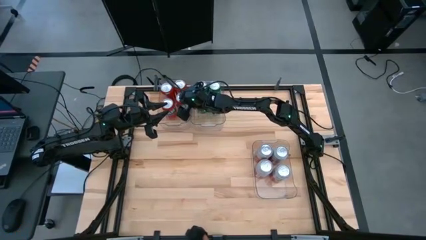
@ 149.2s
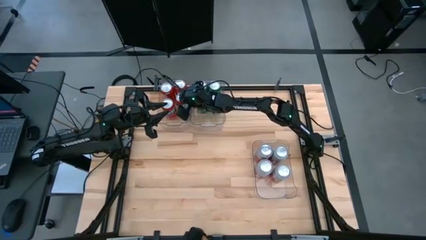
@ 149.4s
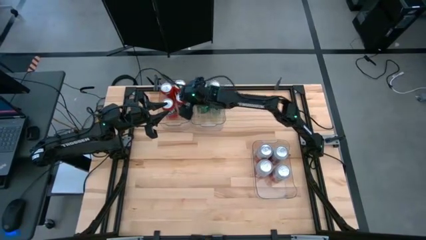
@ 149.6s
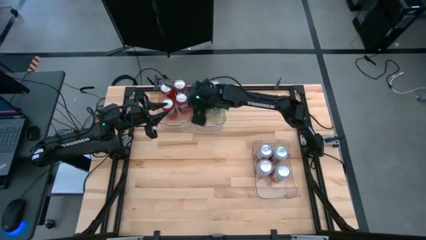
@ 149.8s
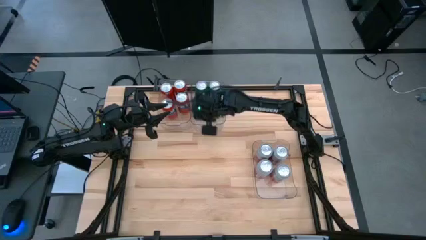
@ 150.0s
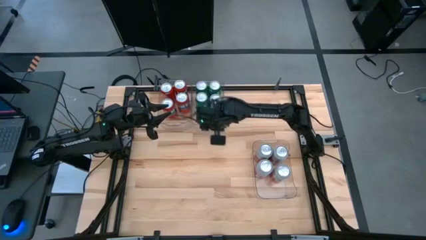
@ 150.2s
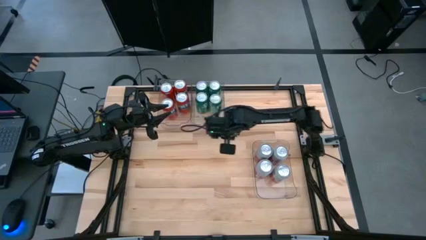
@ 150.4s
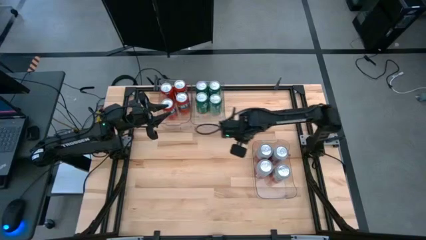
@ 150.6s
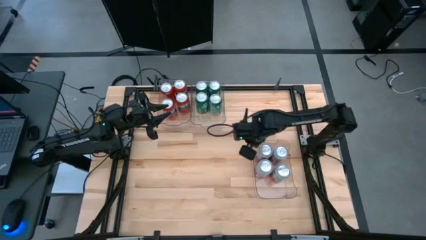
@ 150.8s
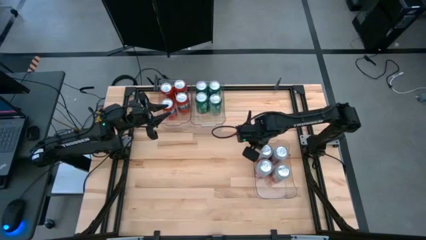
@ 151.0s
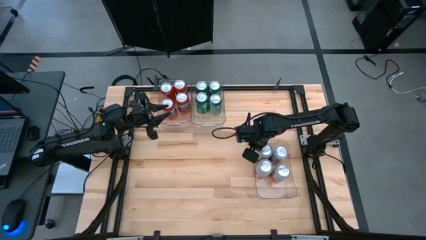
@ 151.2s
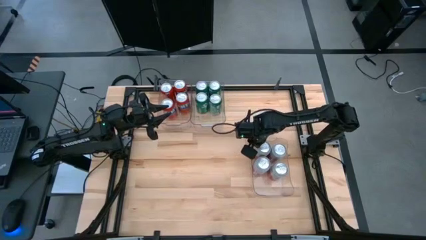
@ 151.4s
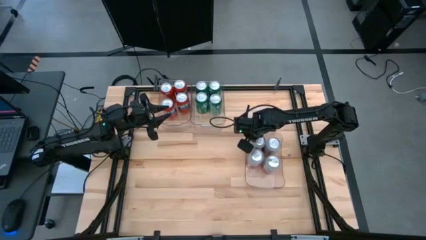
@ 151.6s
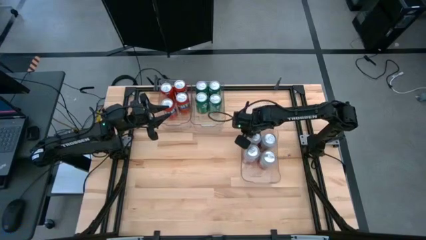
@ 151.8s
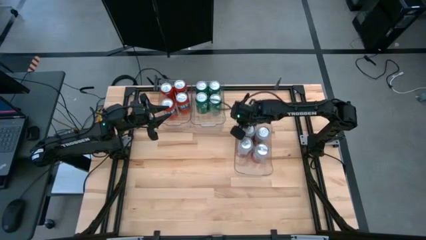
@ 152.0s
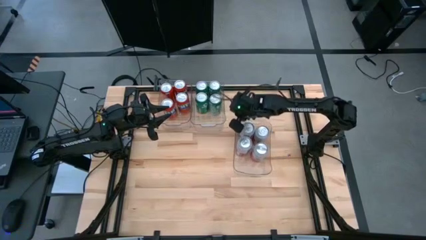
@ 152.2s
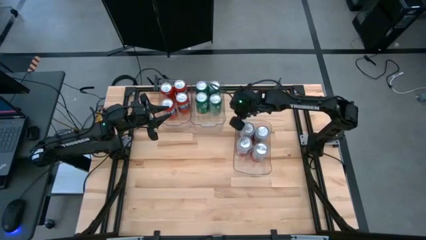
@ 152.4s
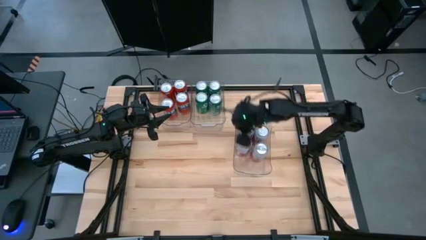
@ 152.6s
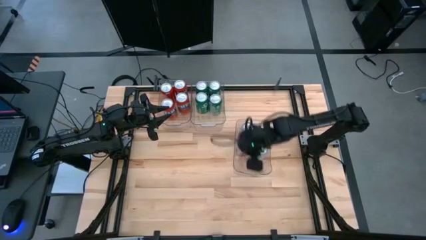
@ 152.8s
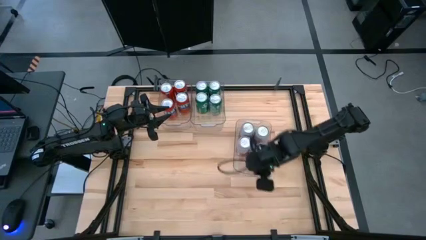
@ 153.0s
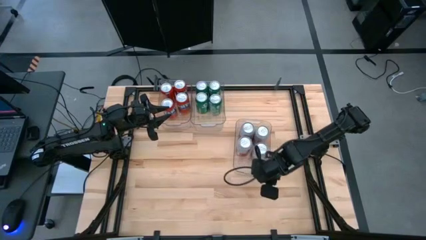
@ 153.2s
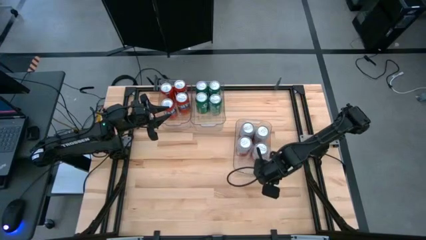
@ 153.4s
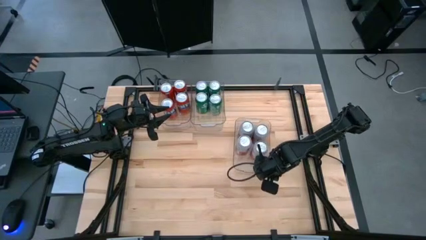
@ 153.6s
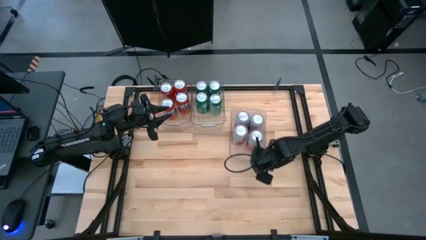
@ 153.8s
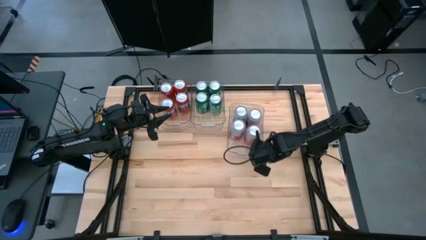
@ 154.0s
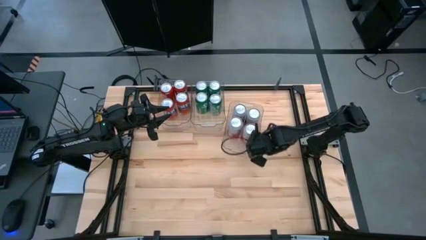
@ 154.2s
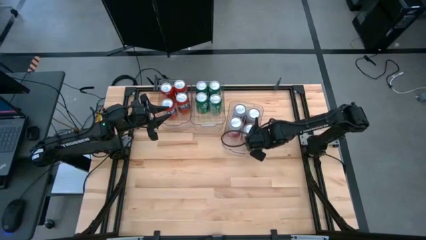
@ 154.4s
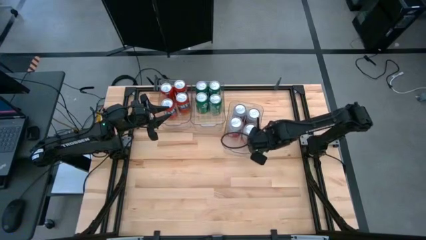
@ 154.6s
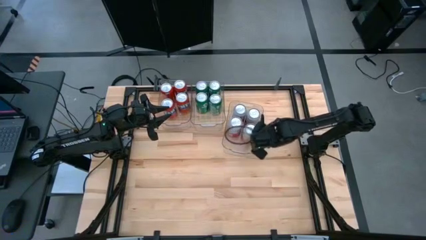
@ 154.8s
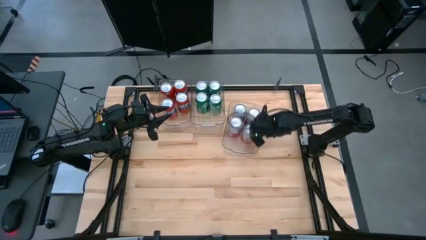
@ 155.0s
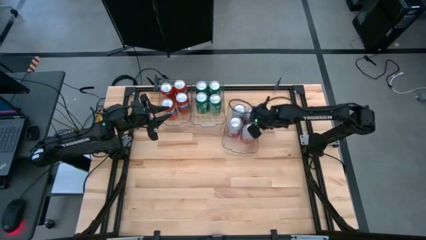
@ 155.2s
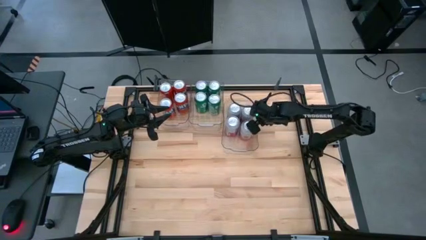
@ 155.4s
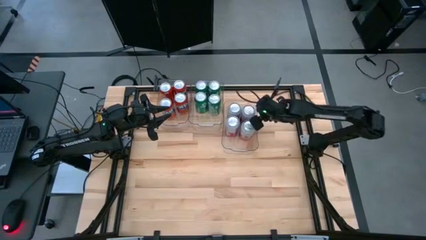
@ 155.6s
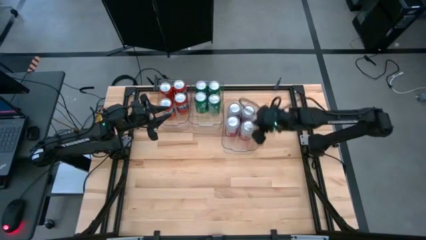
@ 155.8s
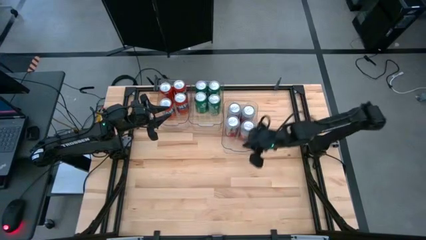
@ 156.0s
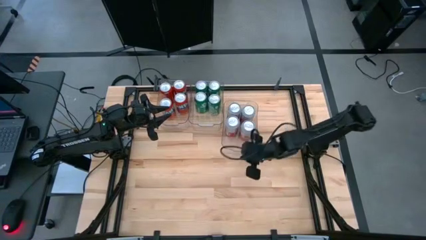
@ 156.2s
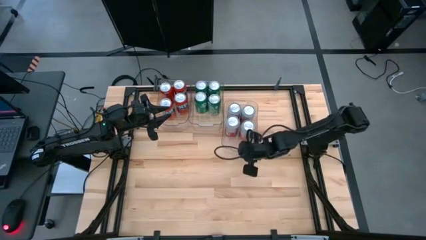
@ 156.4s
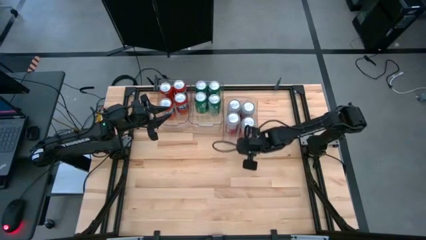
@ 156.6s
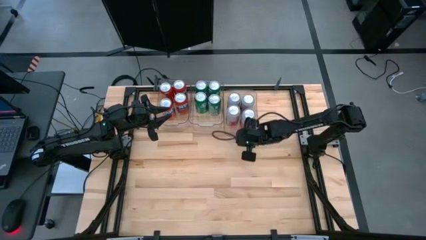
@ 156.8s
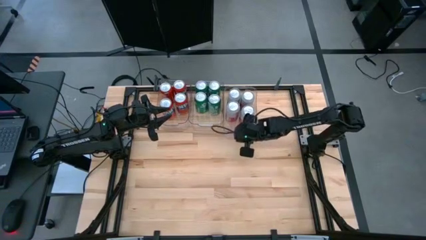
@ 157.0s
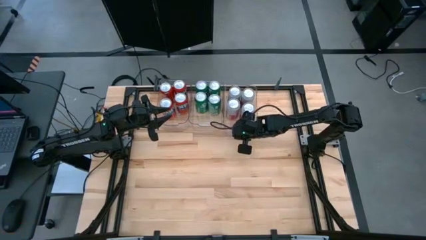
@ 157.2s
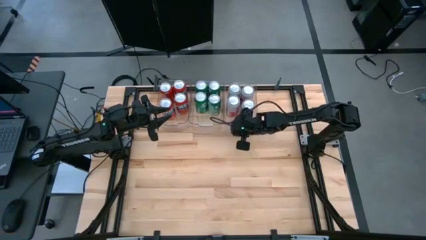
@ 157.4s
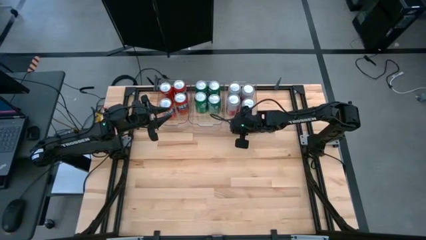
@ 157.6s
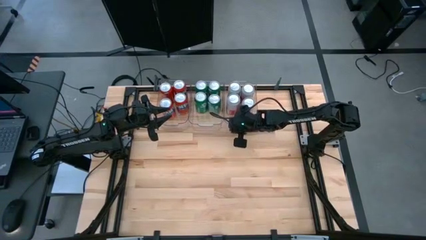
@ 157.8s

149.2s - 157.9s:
Task: Sort soda cans
Move the bottom right transparent bin to the top right of the table

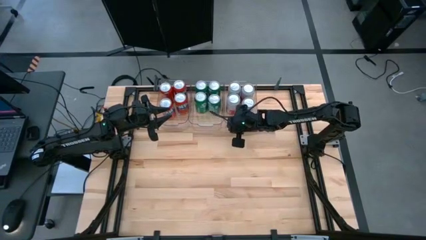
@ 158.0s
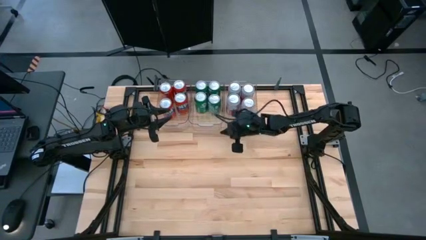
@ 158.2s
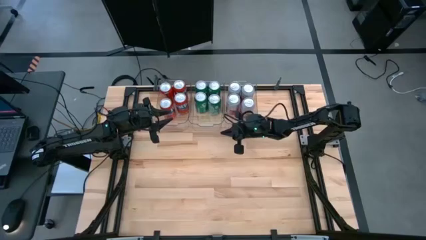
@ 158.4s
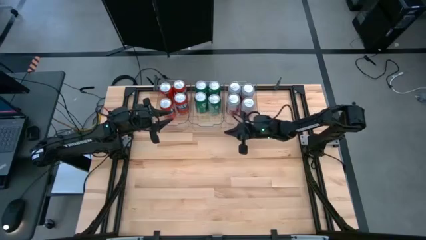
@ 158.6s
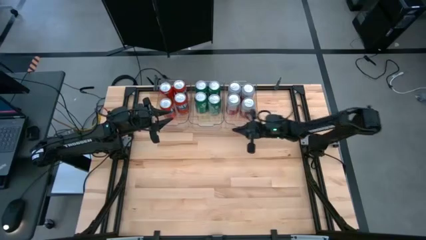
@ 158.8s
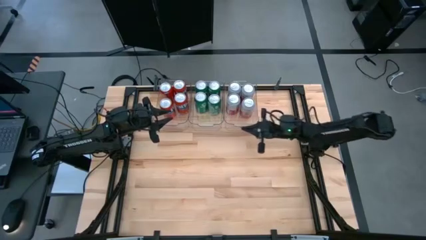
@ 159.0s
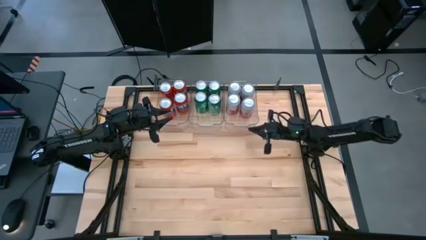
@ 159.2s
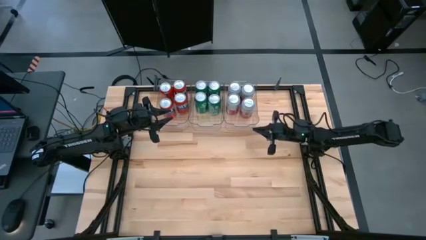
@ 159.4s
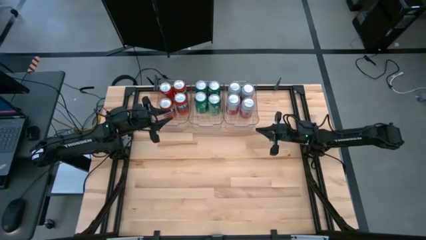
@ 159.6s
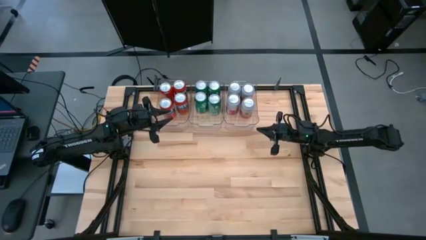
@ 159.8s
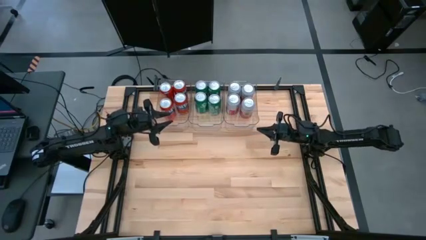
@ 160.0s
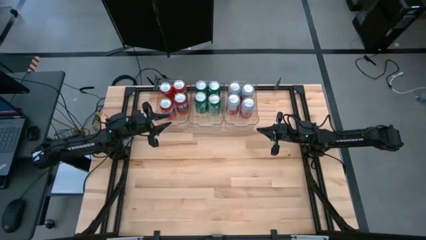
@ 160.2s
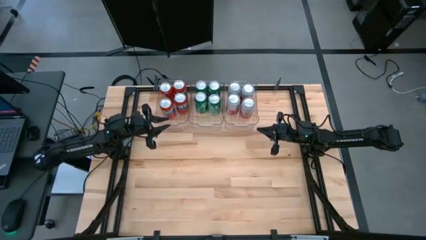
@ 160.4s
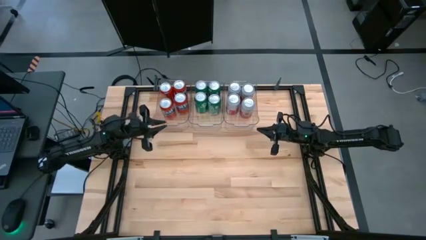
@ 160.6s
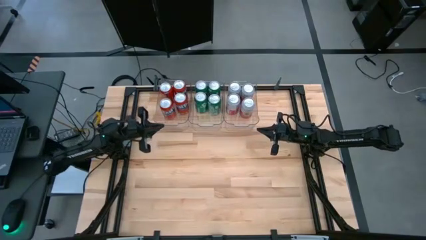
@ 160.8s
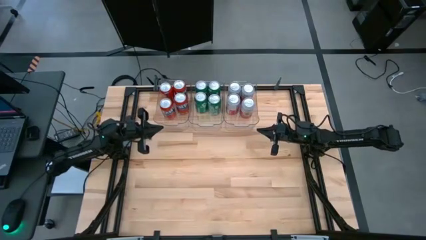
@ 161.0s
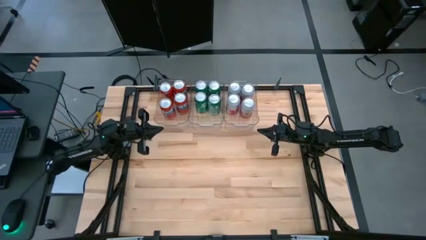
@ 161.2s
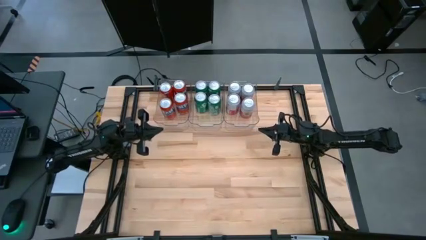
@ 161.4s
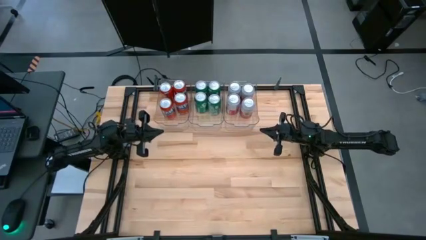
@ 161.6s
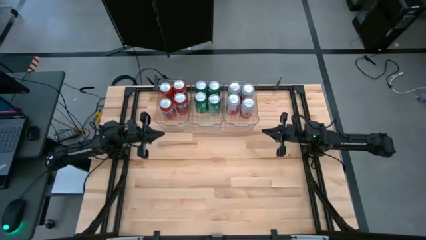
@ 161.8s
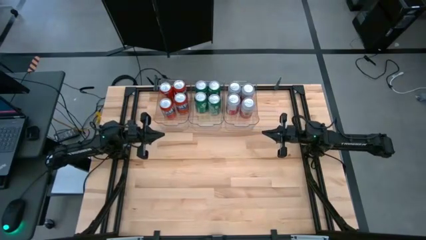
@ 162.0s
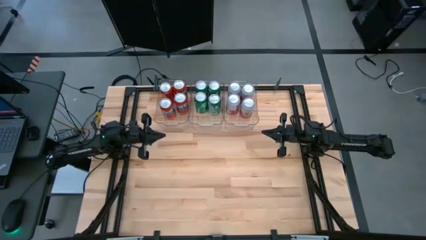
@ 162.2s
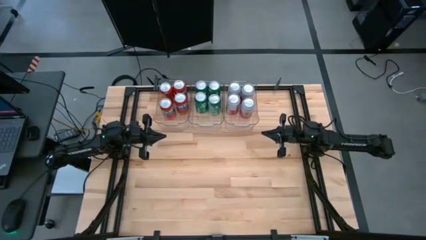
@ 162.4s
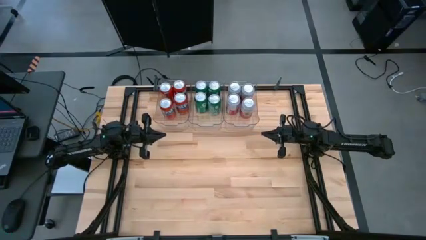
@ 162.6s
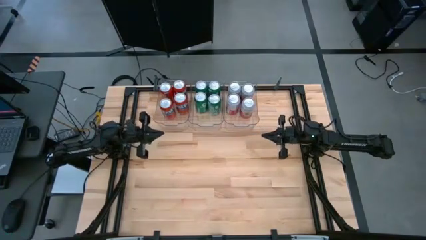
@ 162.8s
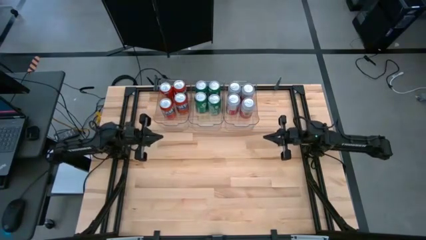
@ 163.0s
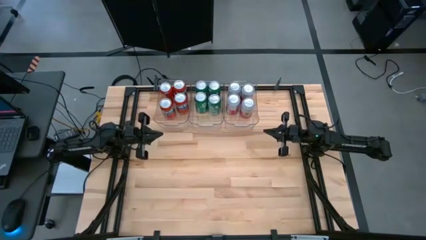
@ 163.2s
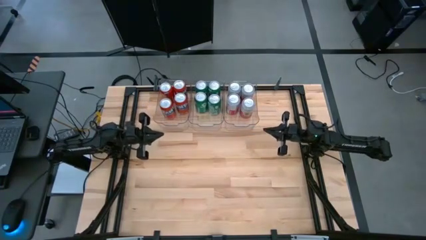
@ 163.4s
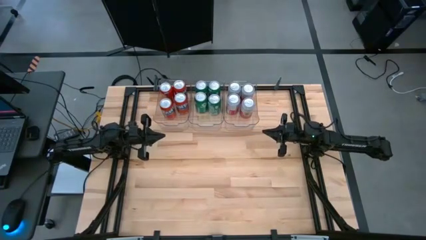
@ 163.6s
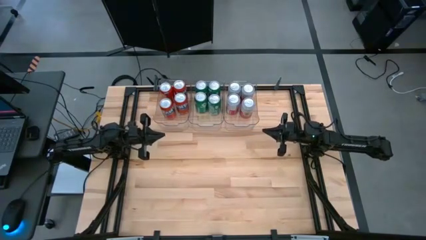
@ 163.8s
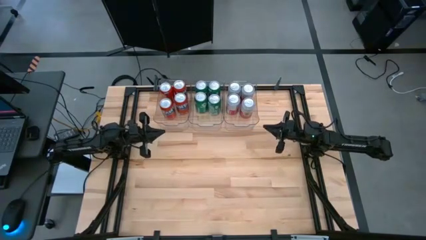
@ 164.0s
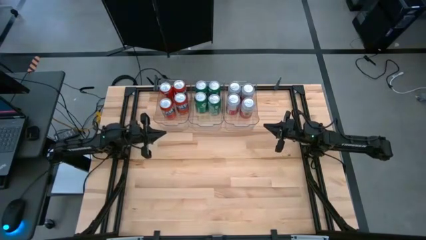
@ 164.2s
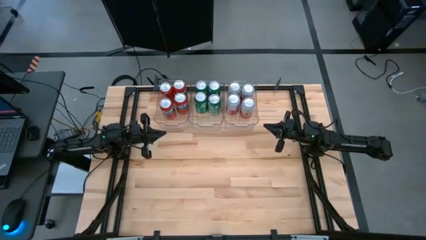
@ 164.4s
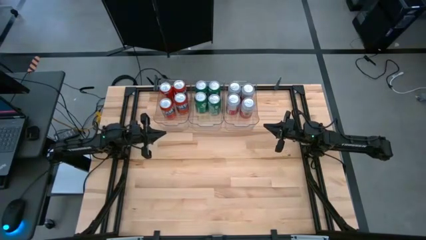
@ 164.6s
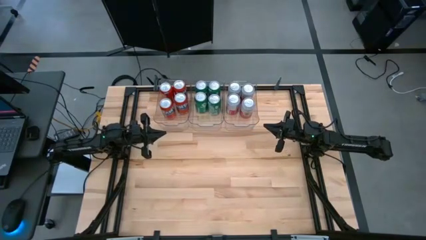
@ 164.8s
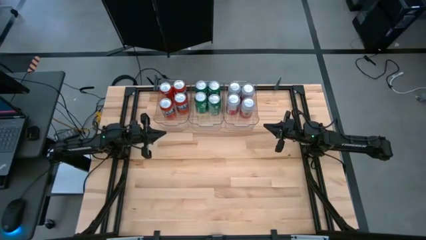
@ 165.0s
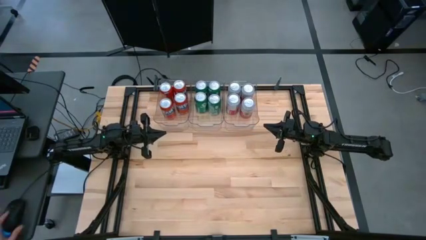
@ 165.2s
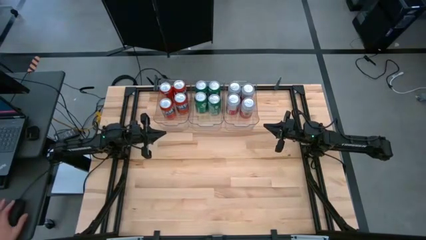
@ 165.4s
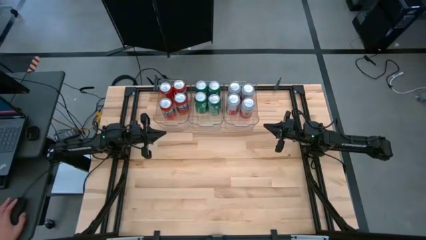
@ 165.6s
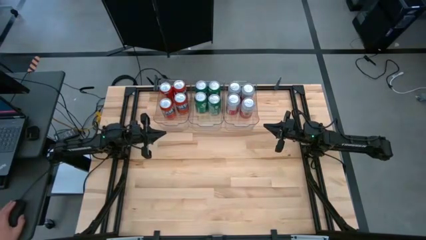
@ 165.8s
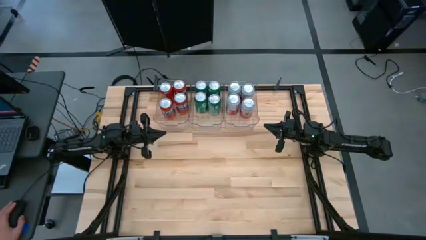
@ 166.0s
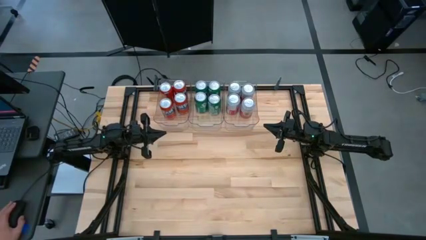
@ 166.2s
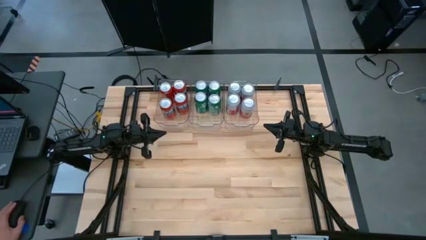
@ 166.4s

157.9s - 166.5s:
Return to Home Position
